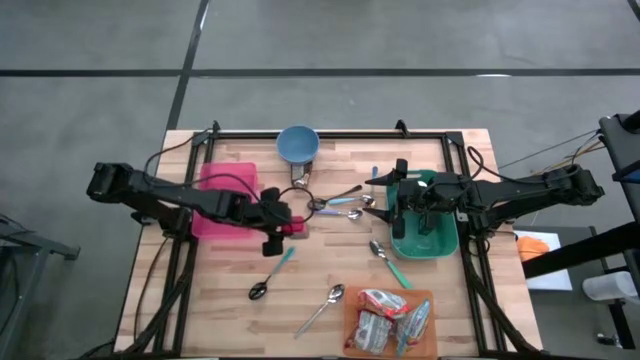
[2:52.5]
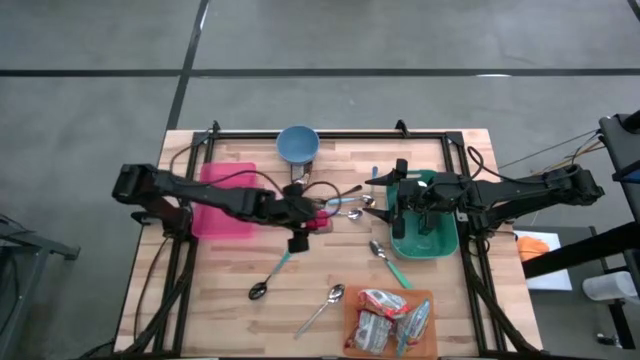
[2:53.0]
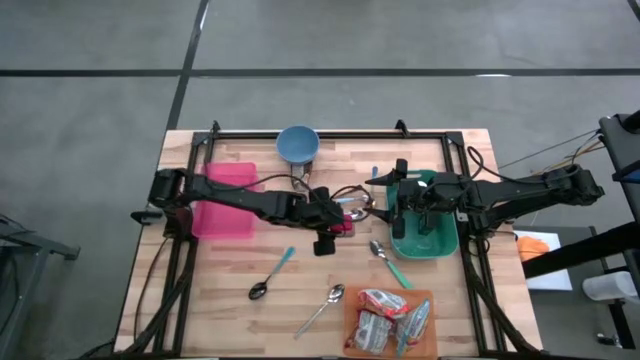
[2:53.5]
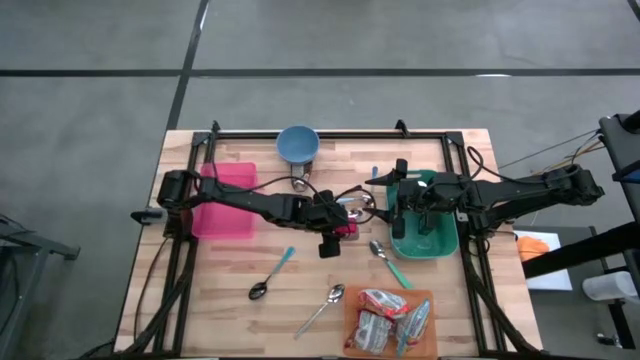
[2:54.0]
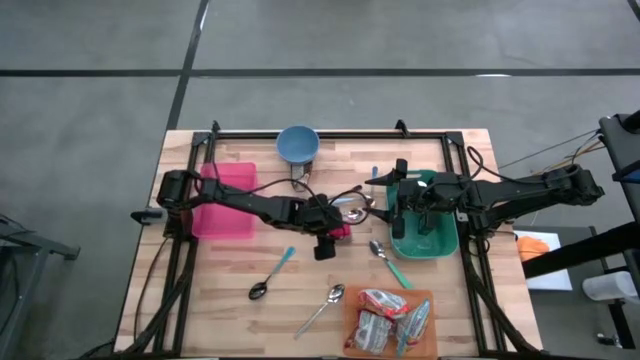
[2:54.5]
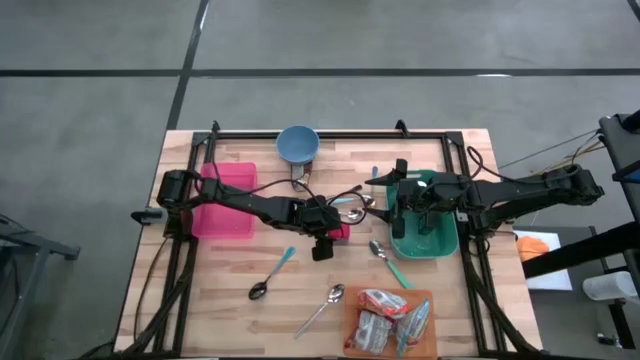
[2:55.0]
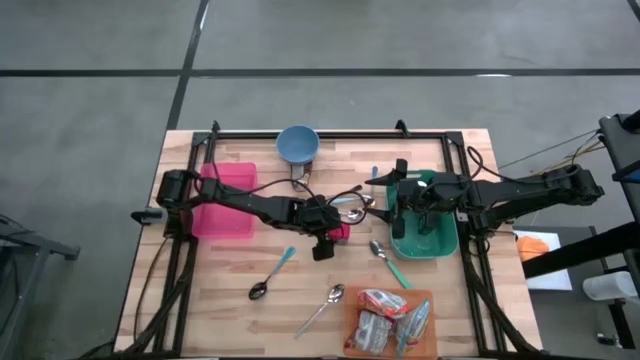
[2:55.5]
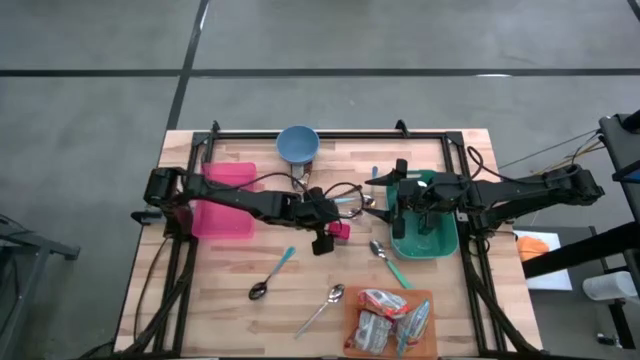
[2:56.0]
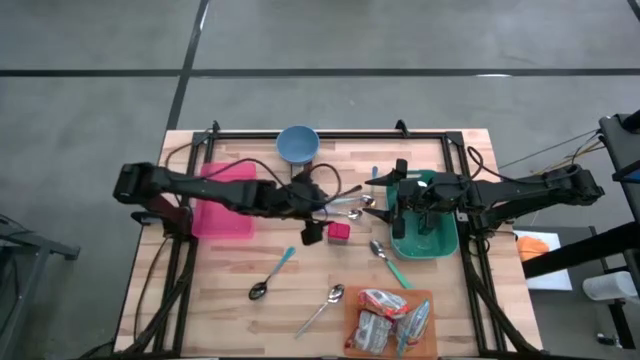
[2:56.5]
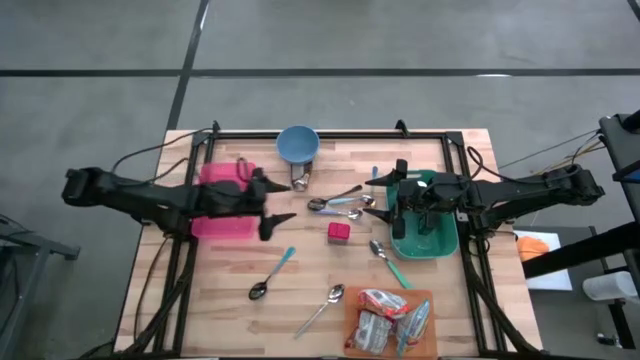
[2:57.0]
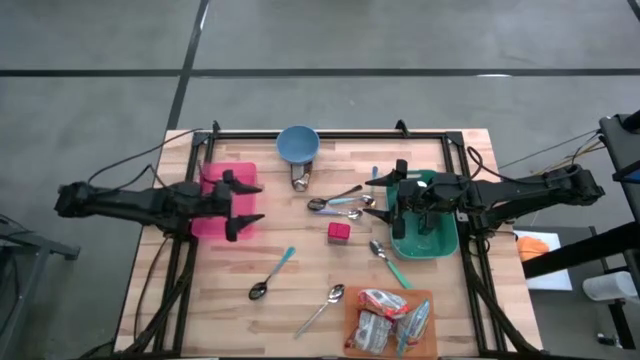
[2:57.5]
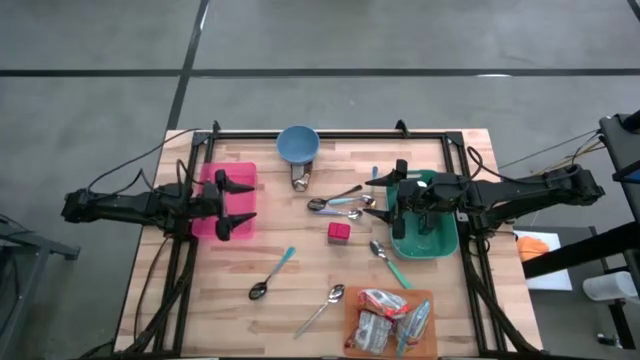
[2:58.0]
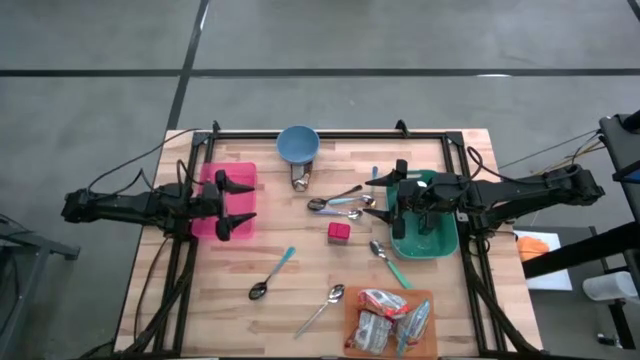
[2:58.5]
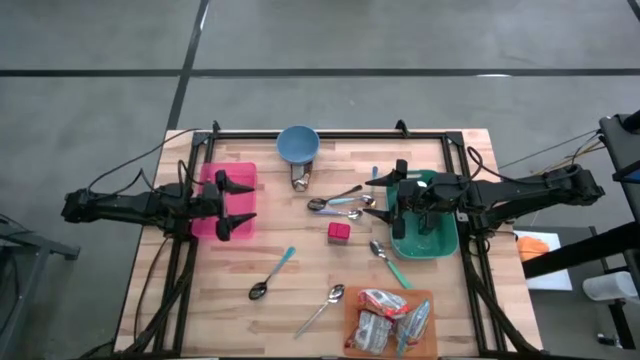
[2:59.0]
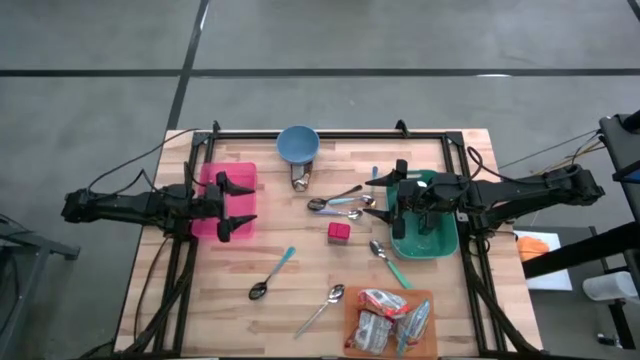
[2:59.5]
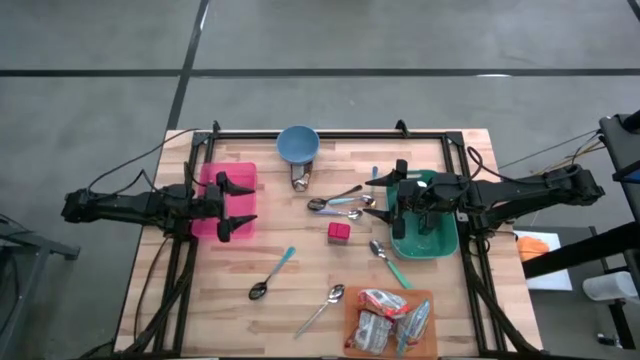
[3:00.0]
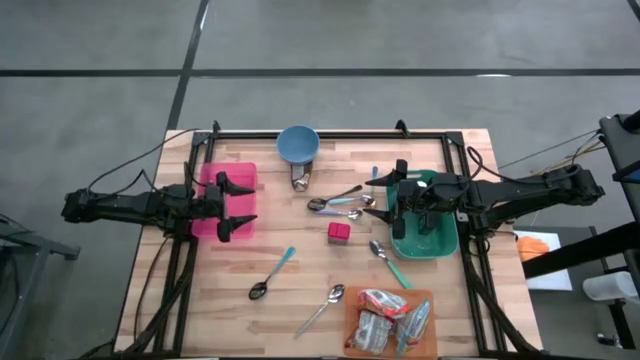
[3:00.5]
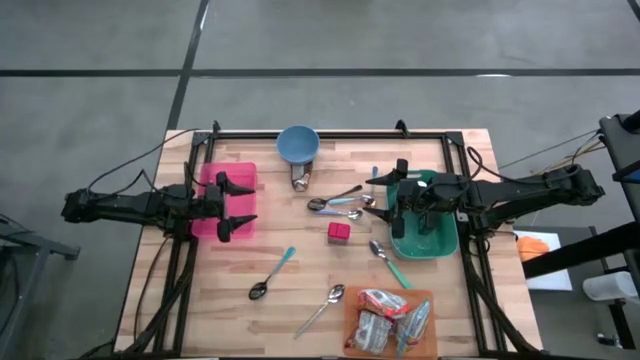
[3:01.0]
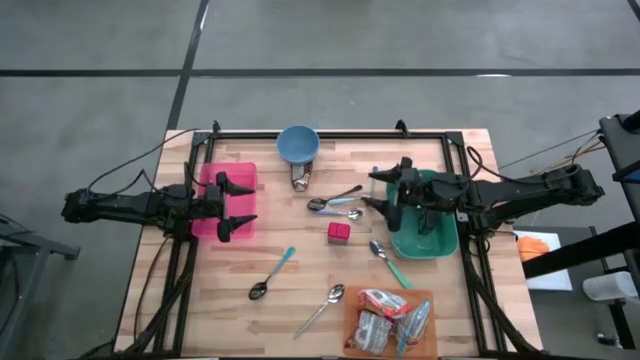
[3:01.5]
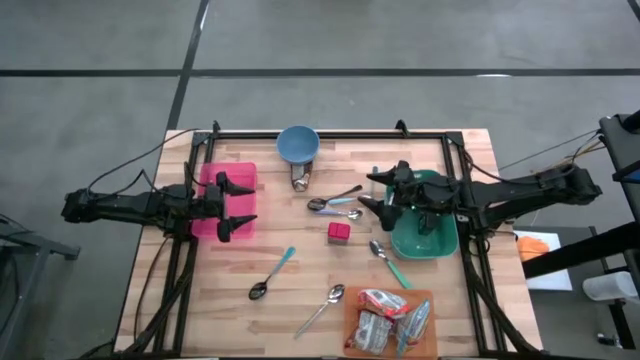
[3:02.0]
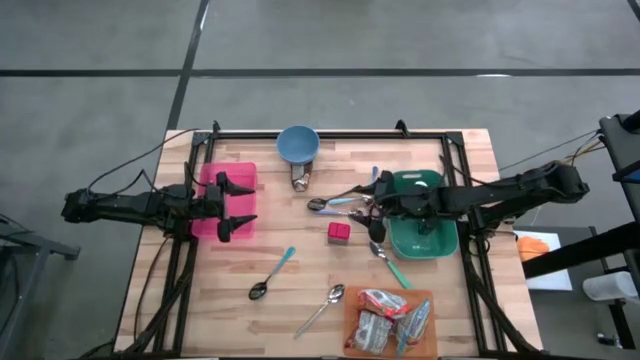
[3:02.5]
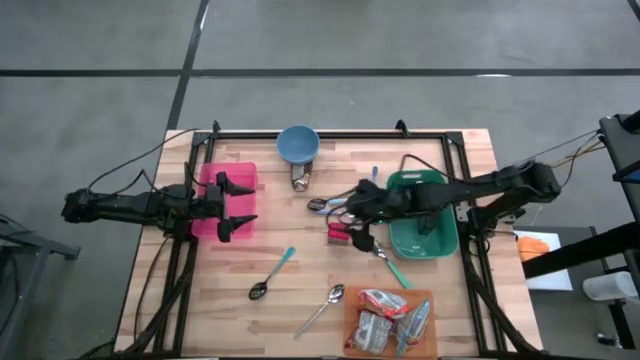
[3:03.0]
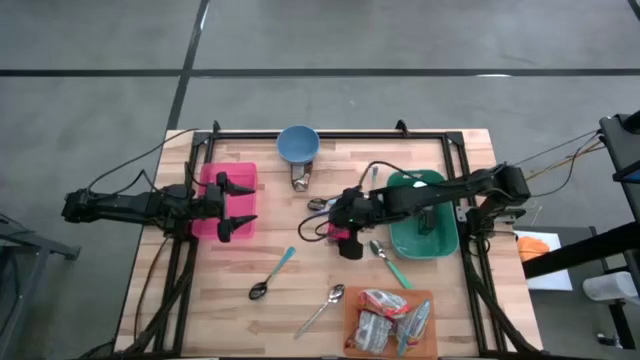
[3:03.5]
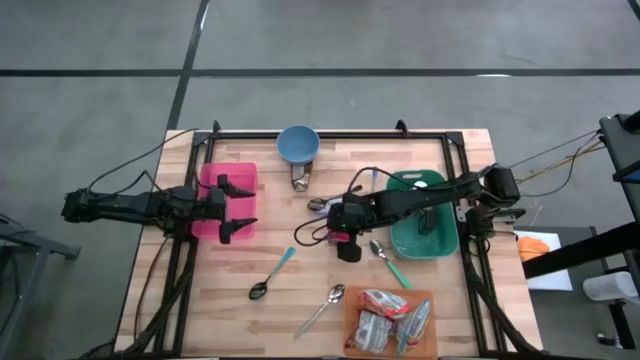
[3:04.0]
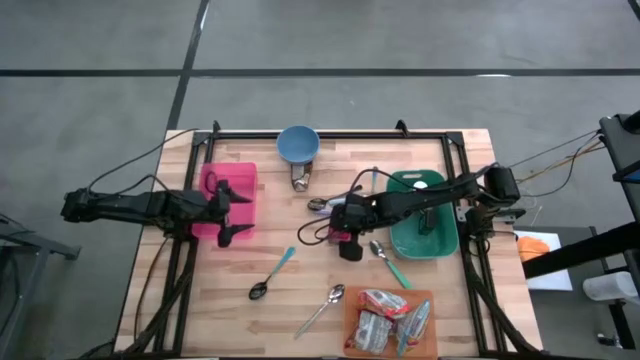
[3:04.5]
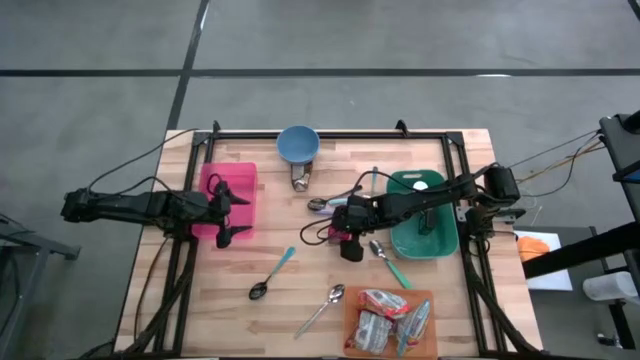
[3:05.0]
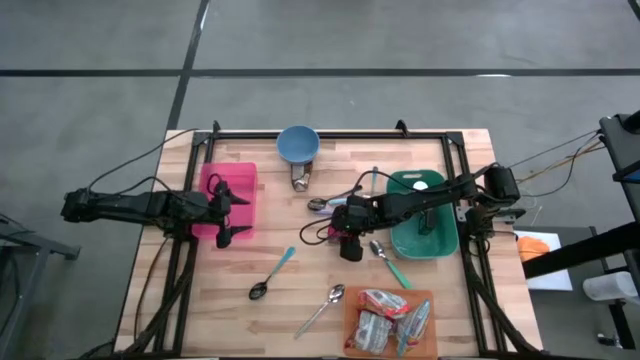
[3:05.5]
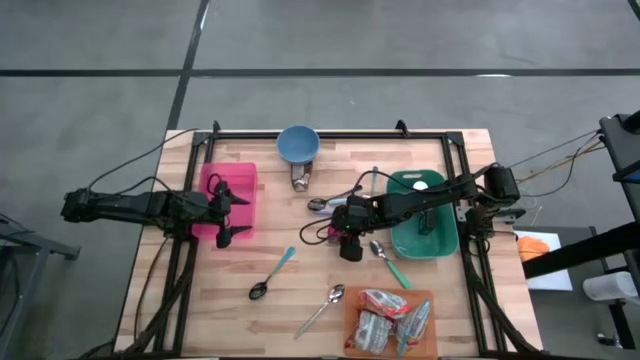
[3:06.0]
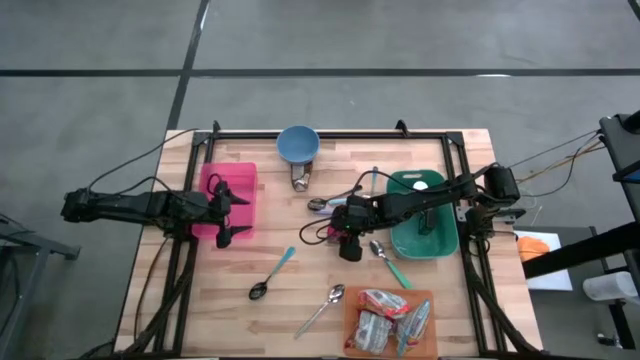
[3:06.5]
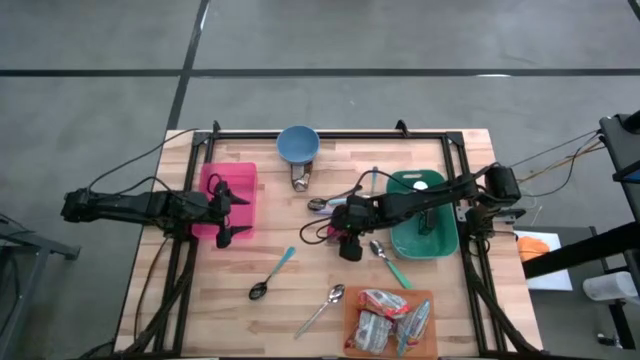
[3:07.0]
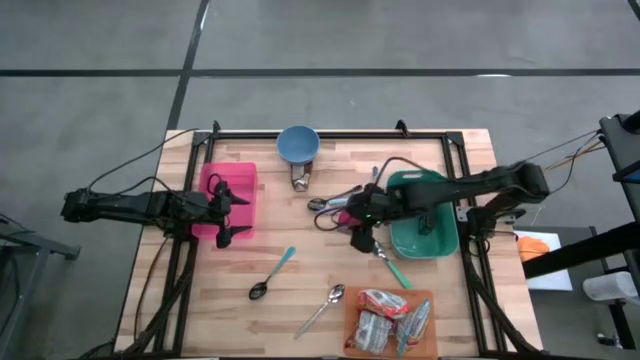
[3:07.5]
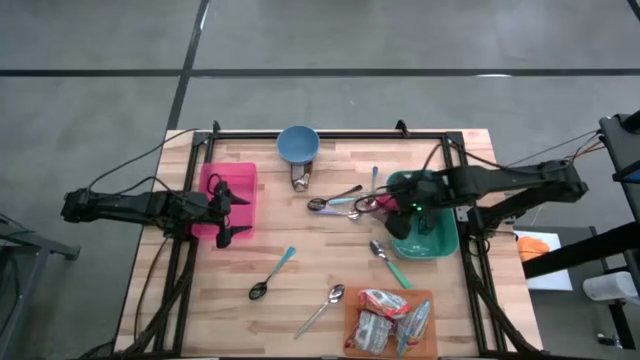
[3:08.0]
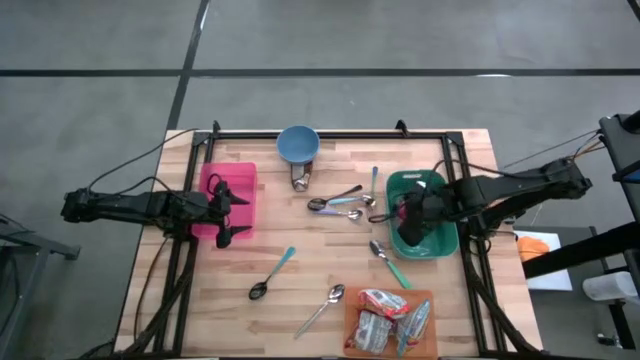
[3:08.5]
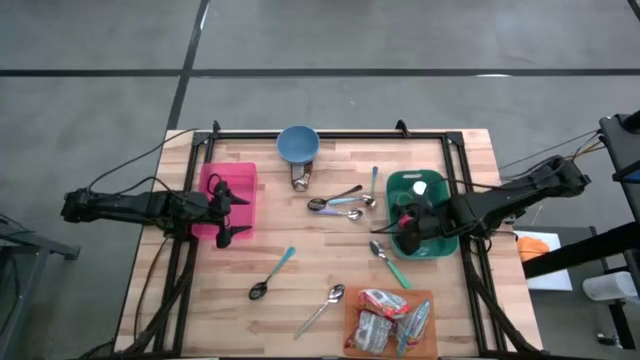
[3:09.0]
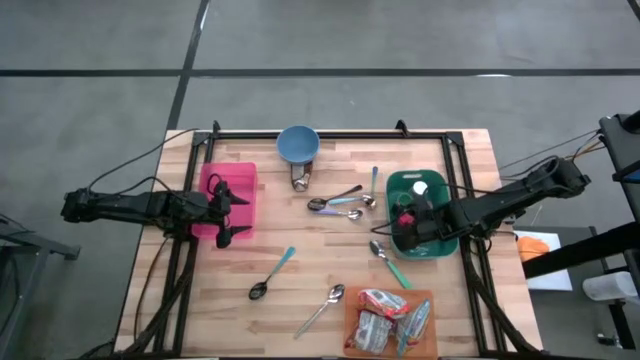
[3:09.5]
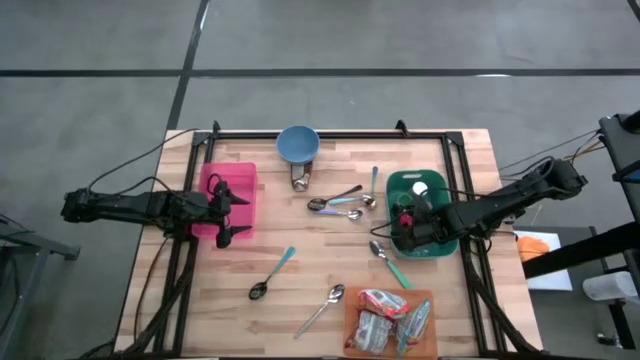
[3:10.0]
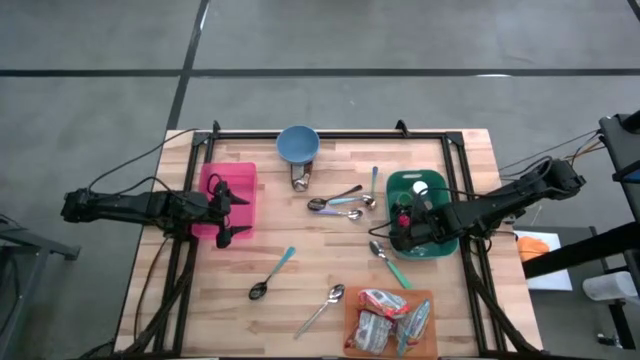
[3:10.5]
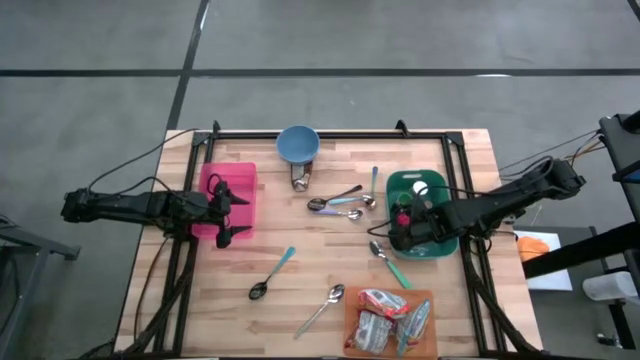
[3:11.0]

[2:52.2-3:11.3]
Put the red seasoning can into the green bin
